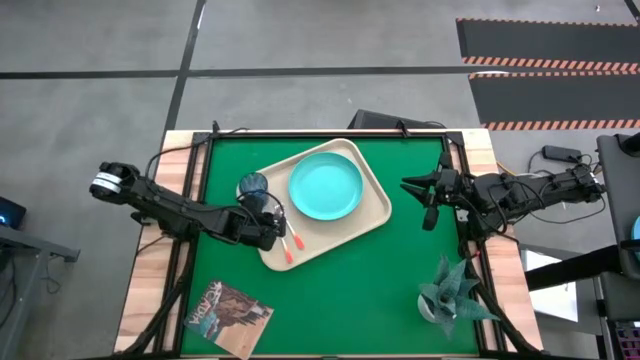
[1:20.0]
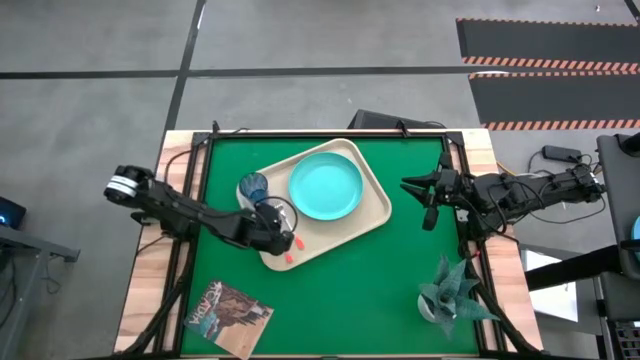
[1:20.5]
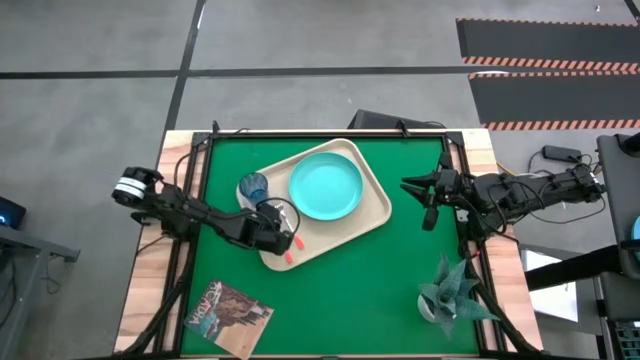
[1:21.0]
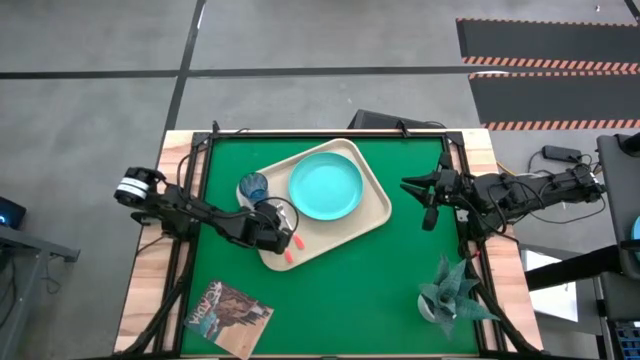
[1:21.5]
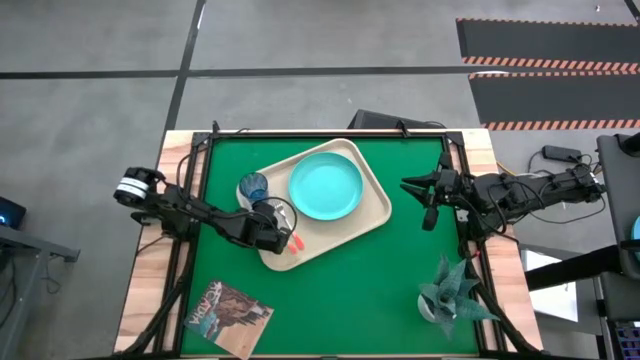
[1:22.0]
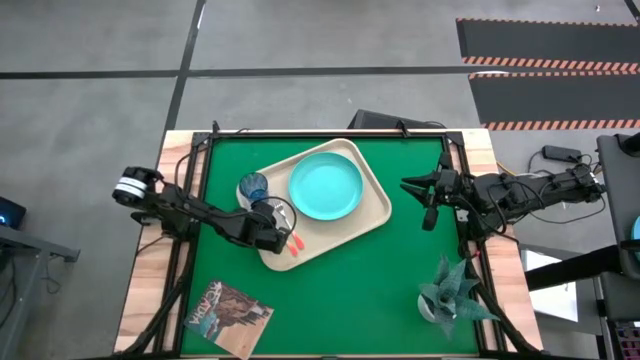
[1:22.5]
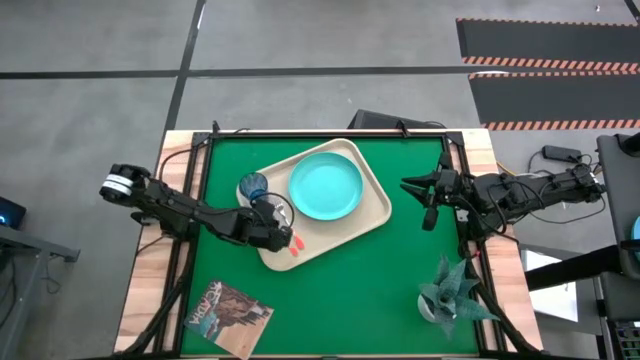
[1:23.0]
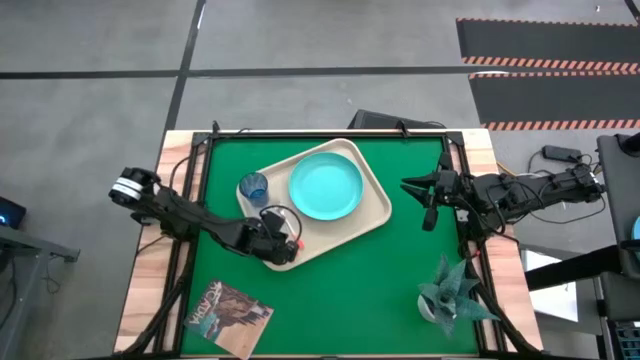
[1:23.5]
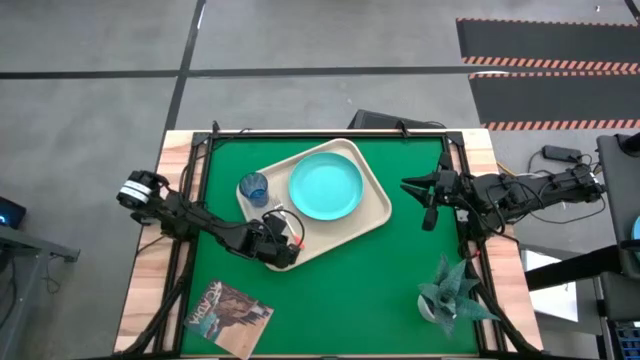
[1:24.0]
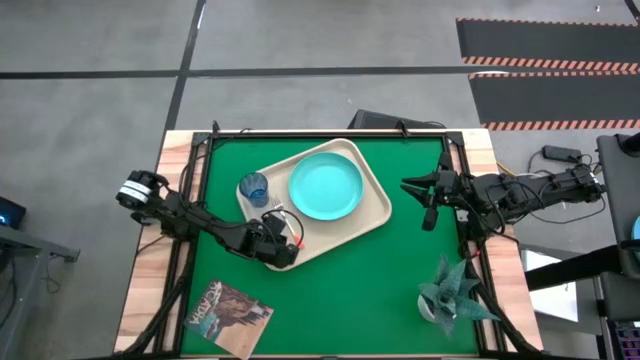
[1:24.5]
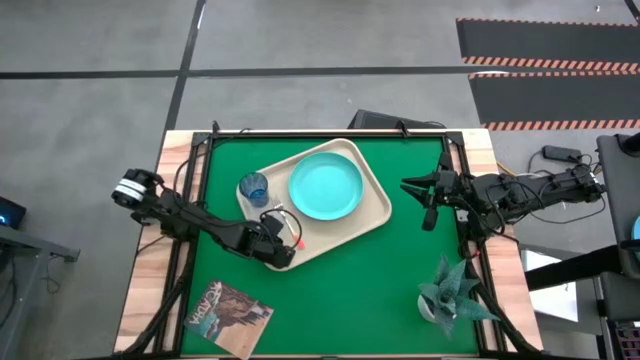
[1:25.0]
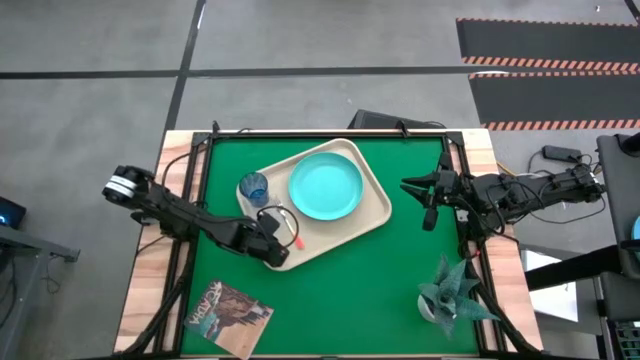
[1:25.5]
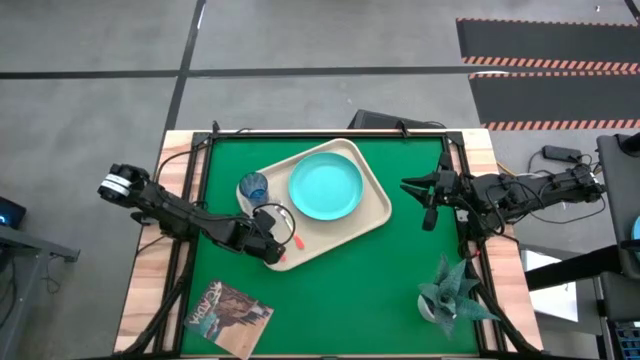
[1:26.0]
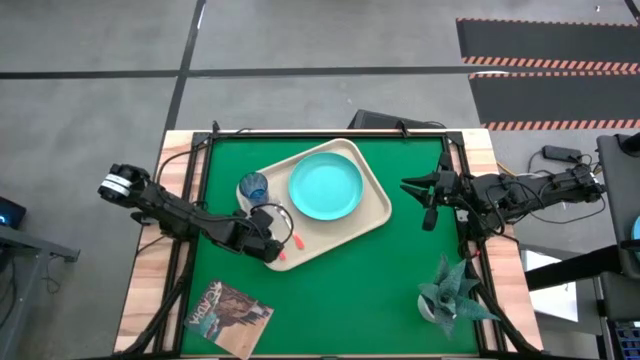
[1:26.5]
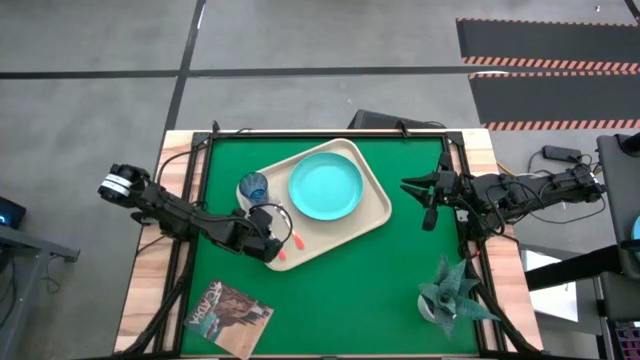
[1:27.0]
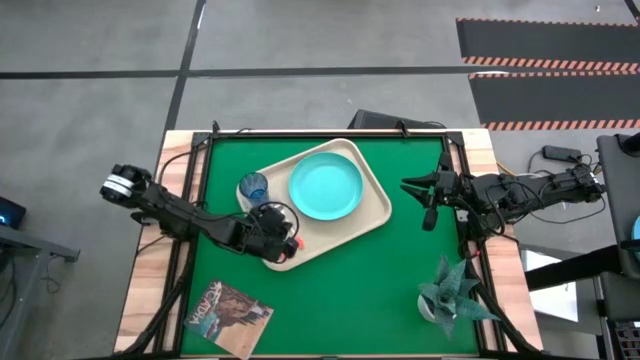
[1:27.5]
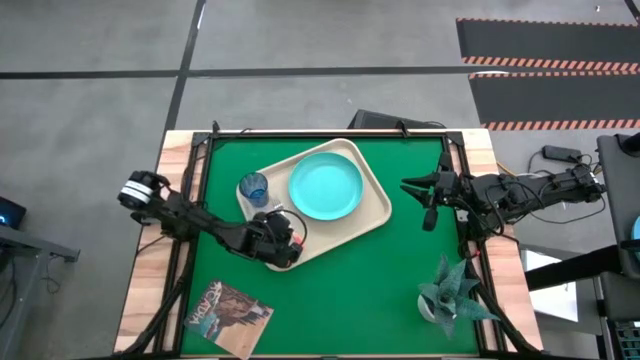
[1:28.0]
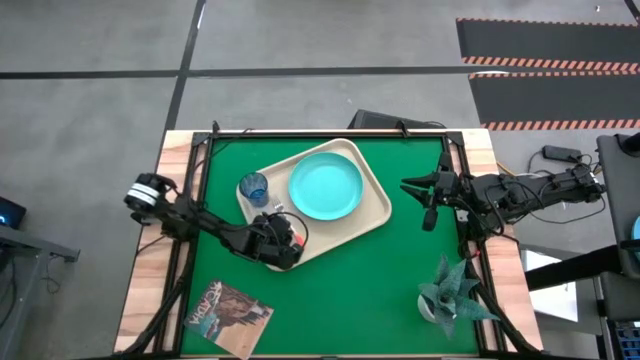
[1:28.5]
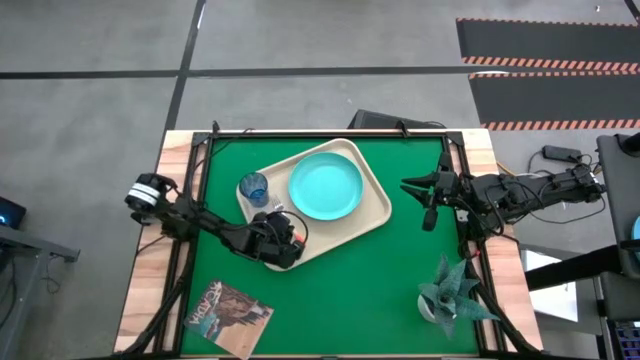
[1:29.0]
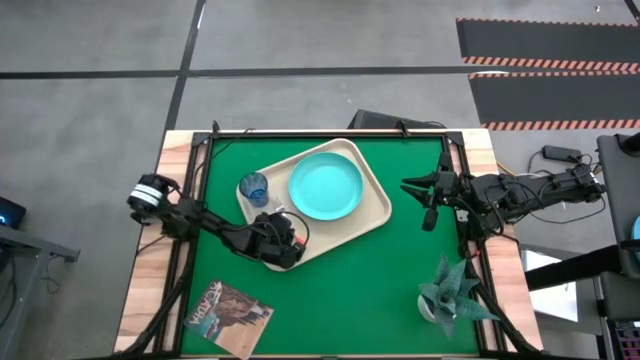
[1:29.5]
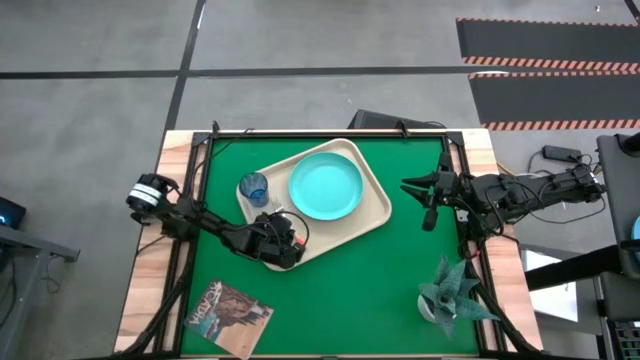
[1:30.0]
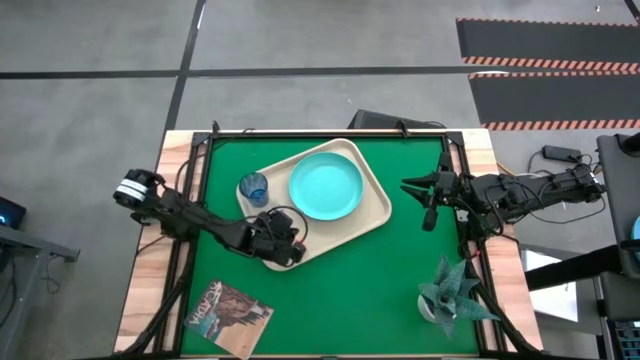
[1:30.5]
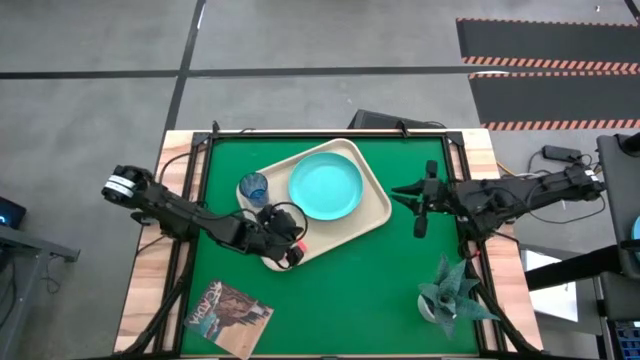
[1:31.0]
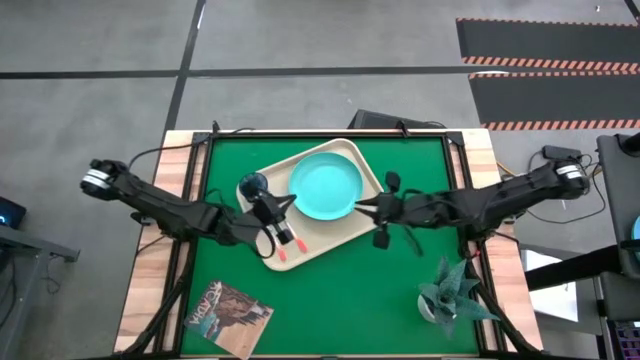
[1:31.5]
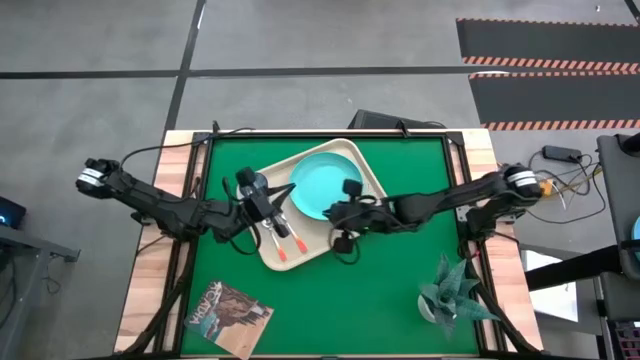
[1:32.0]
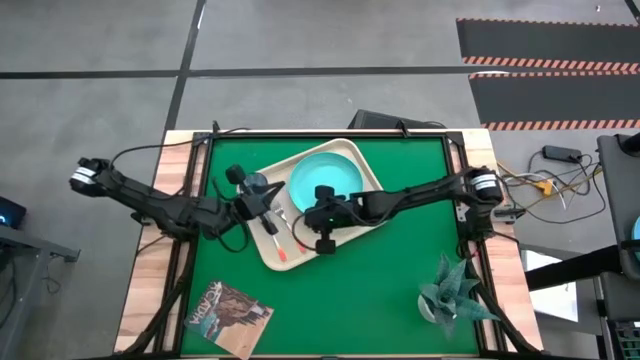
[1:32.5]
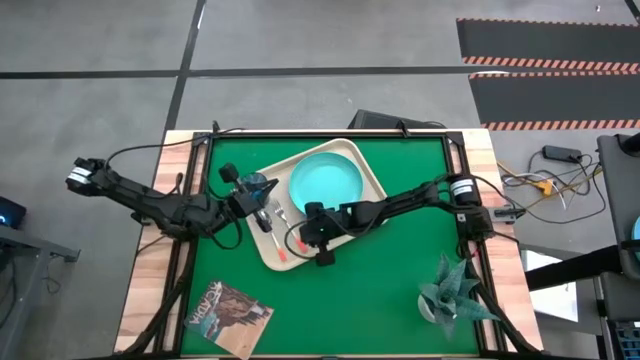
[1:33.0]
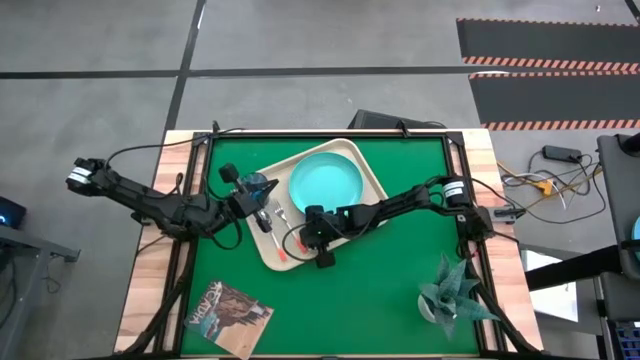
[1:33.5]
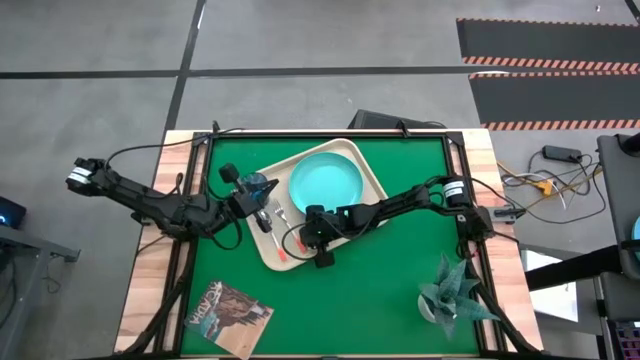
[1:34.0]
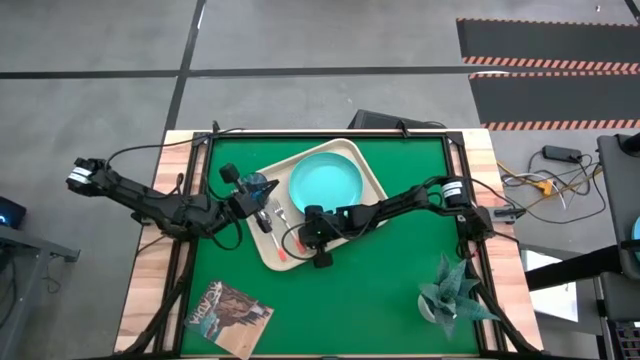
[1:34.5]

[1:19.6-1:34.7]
Task: Pick and place plate/cup/fork/spoon on tray
Adjust the position of the spoon and fork on the white tray

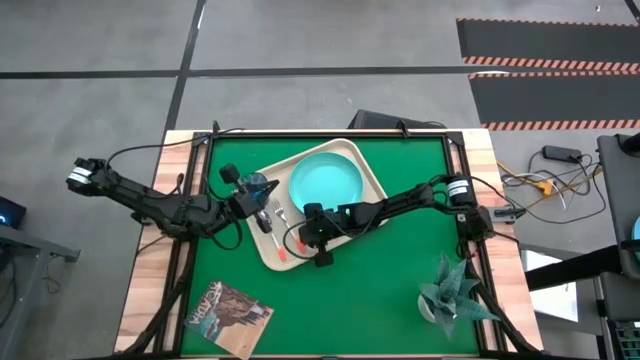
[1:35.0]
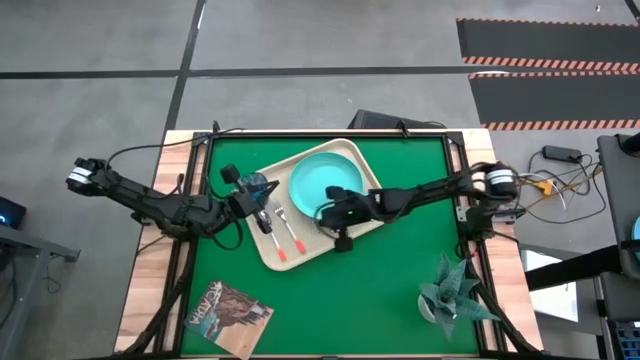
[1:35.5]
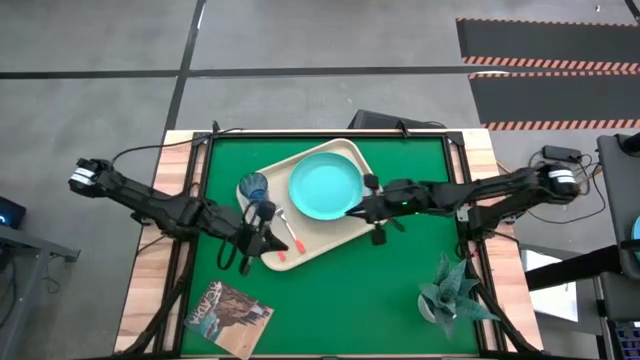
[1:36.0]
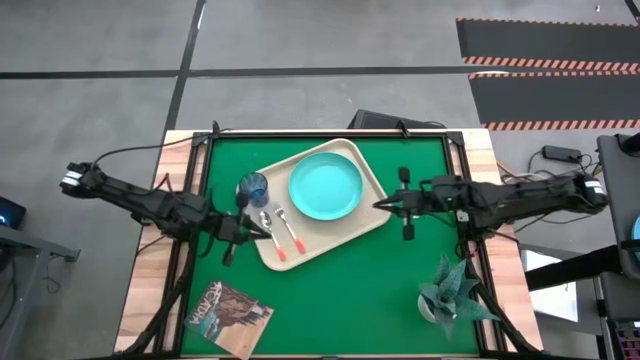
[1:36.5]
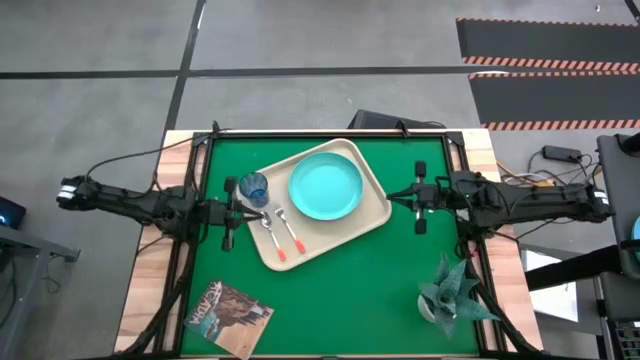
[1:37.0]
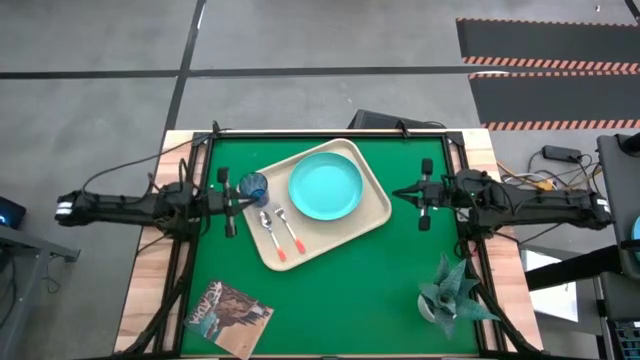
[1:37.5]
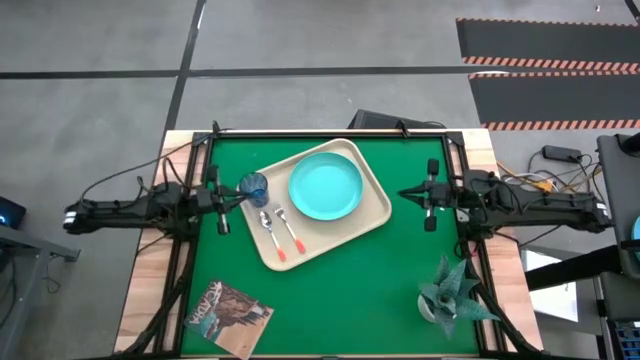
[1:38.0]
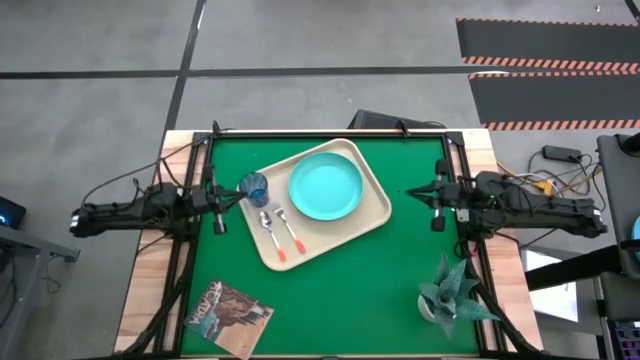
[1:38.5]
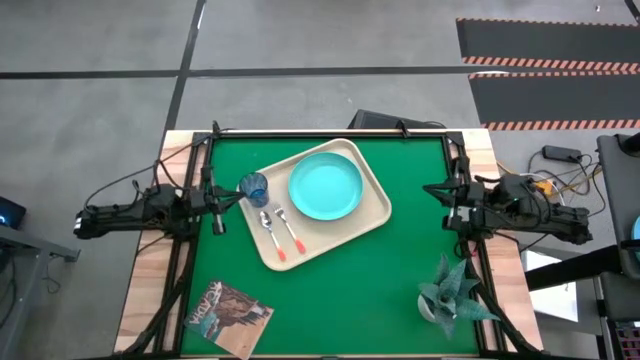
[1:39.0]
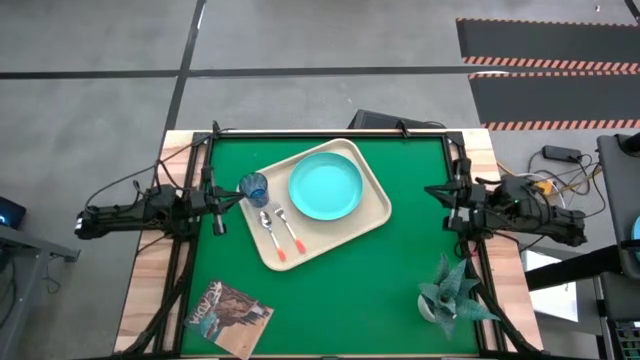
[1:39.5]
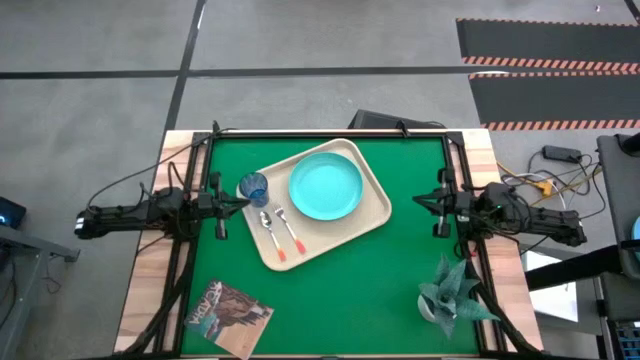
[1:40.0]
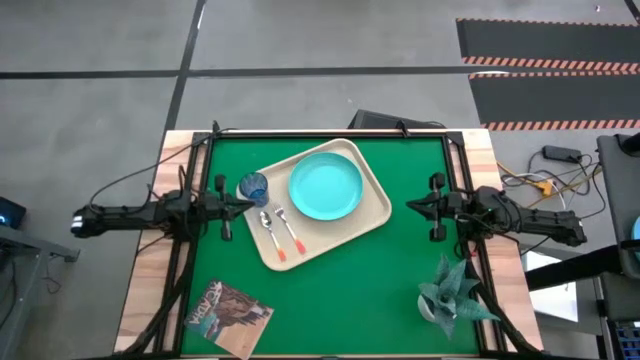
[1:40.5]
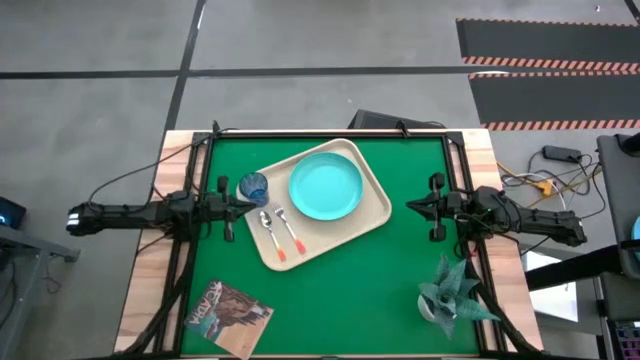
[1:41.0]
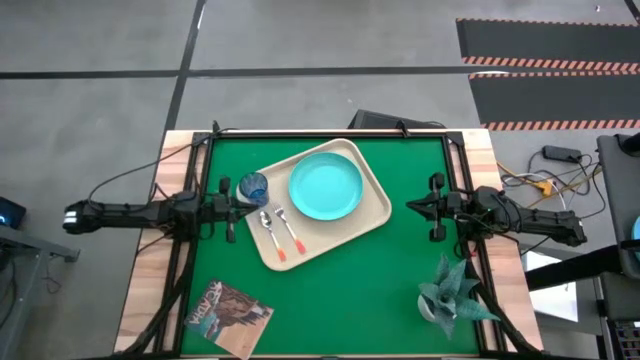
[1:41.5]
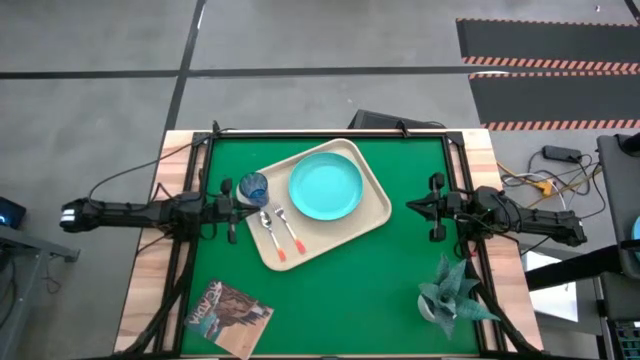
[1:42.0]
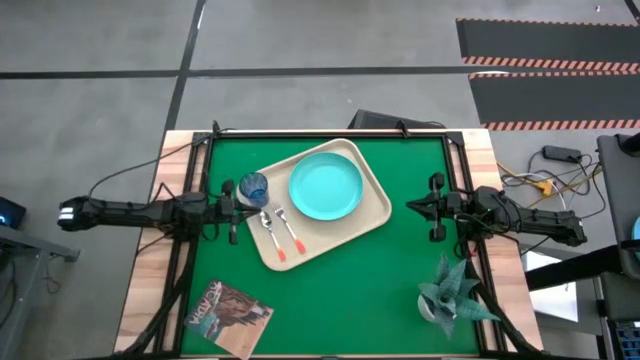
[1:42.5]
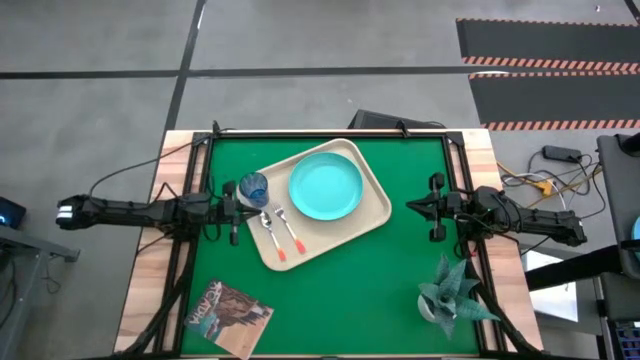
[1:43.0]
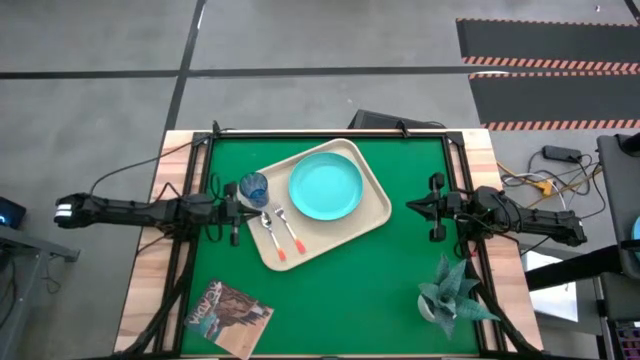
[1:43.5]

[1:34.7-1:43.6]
Return to Home Position
